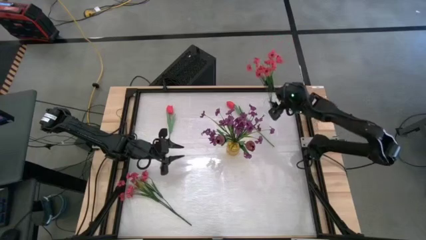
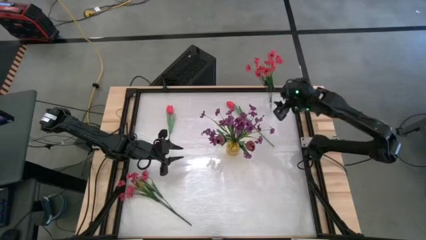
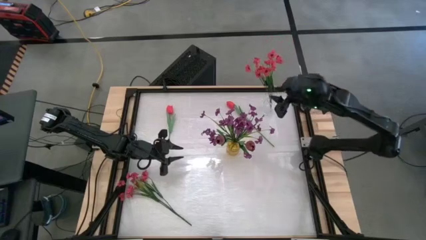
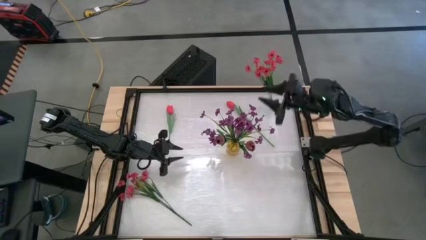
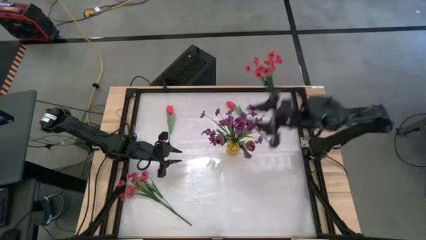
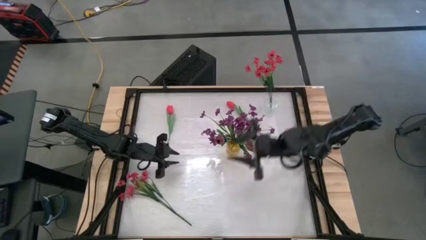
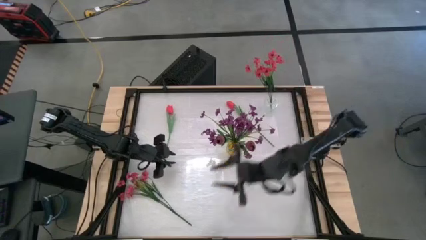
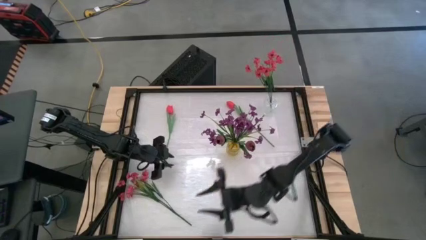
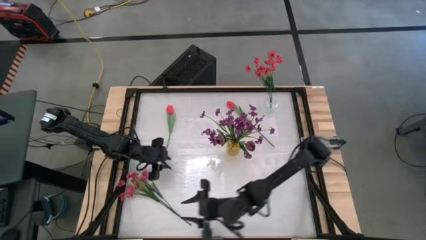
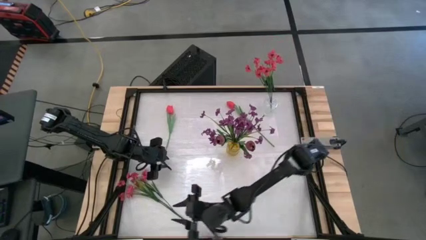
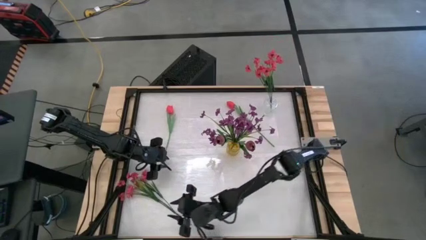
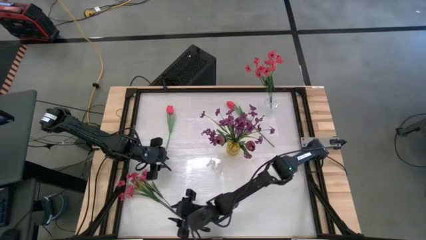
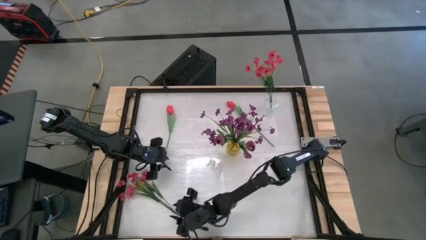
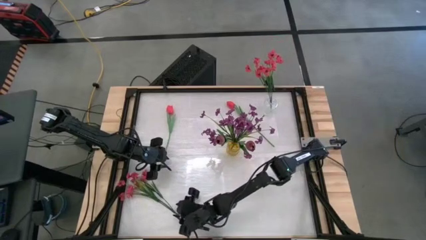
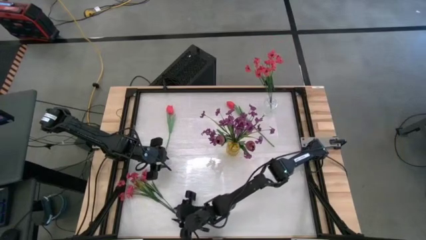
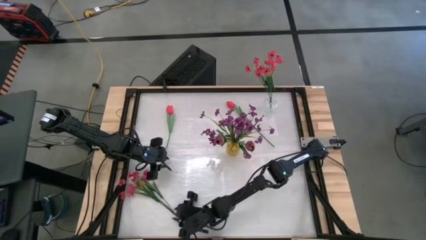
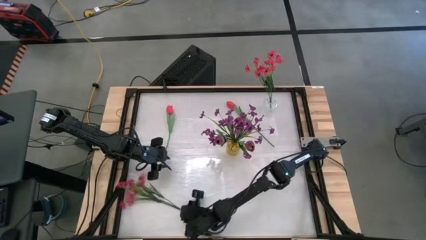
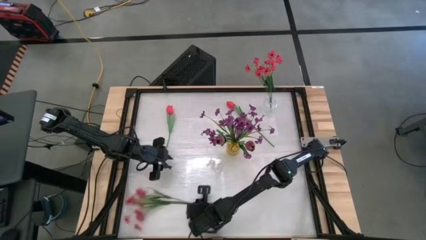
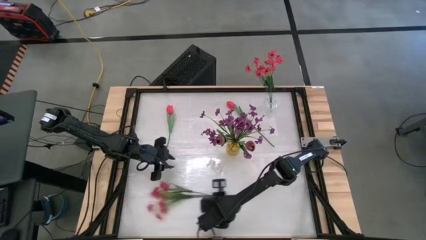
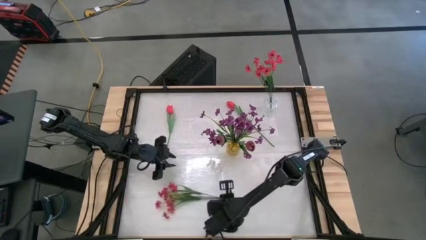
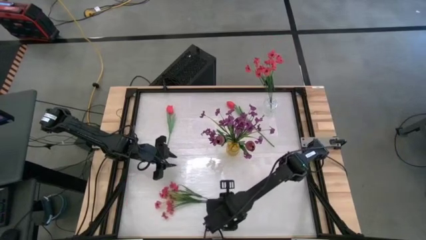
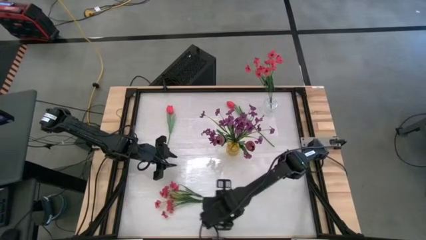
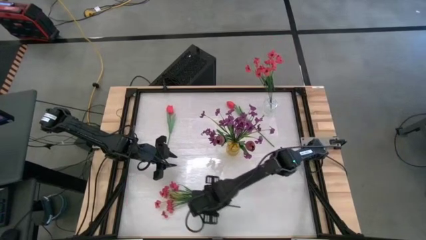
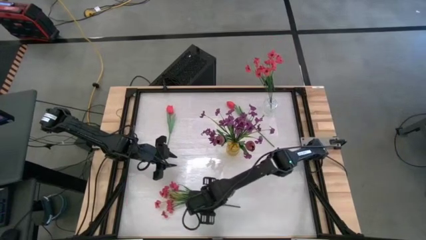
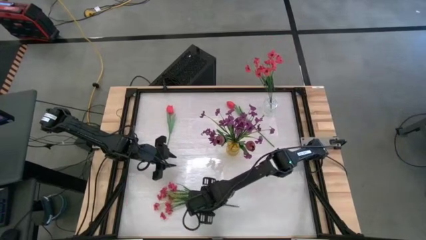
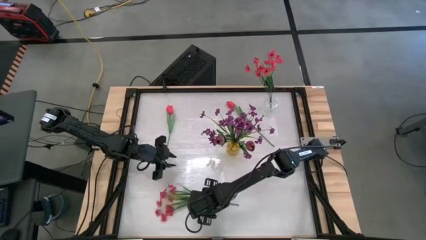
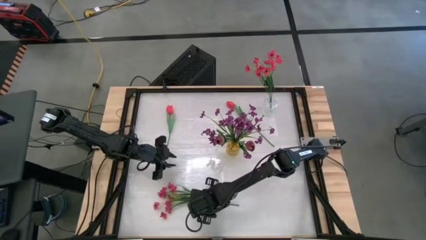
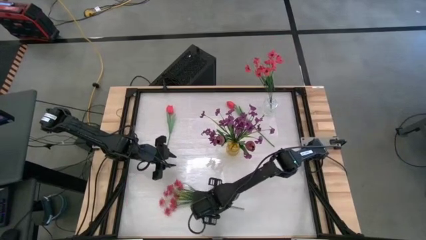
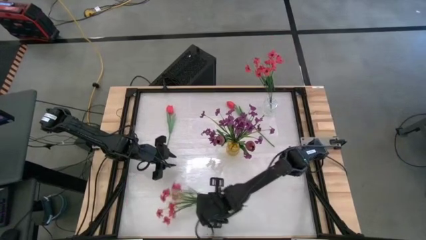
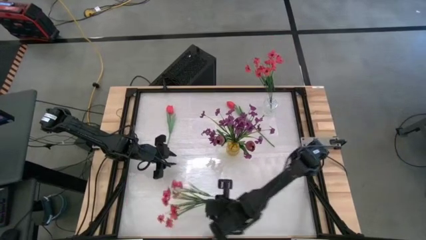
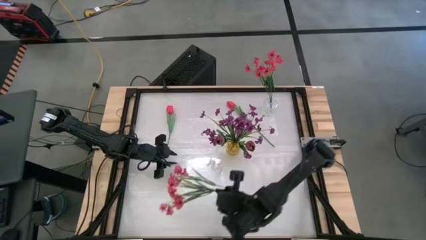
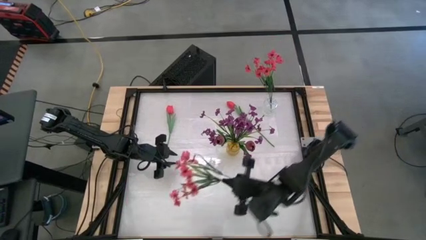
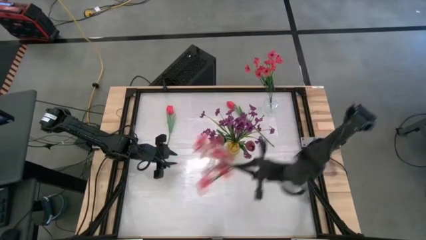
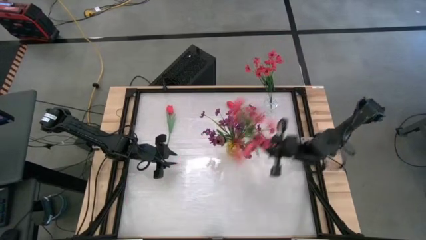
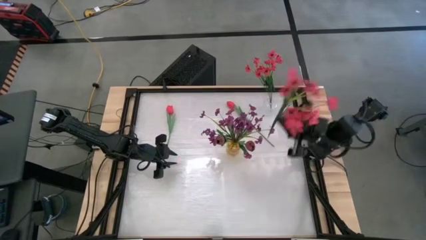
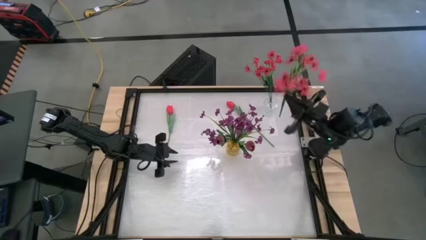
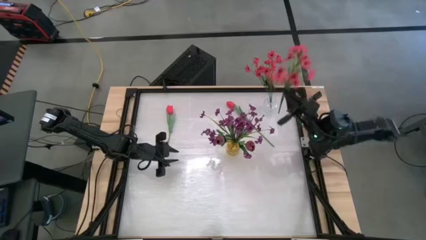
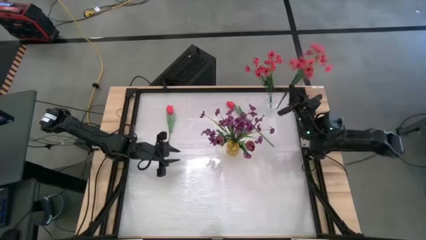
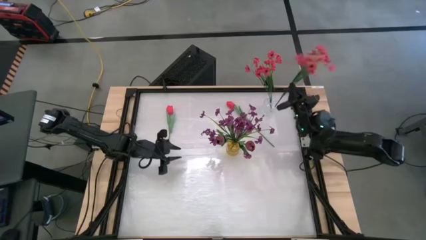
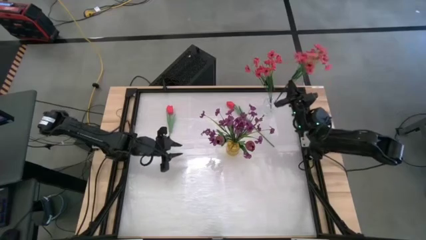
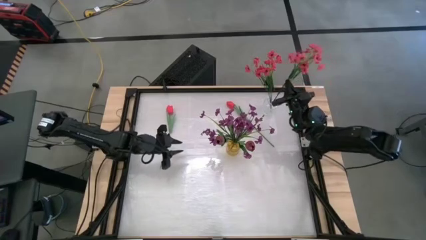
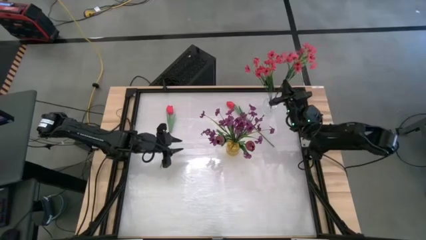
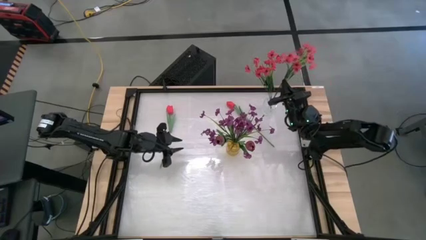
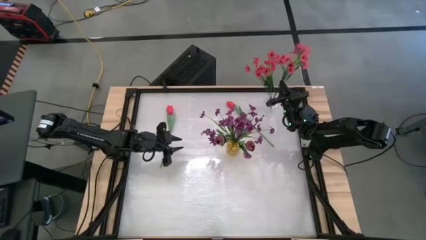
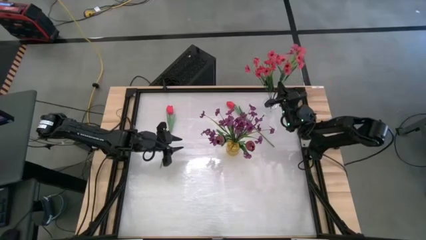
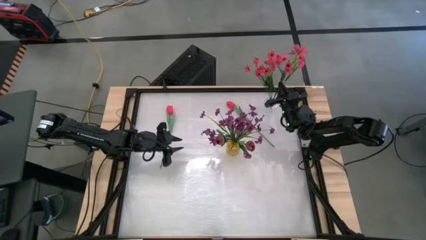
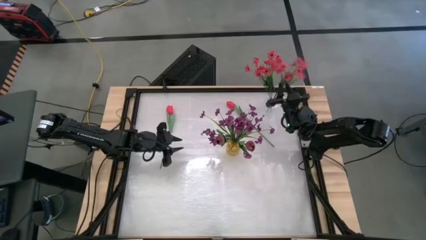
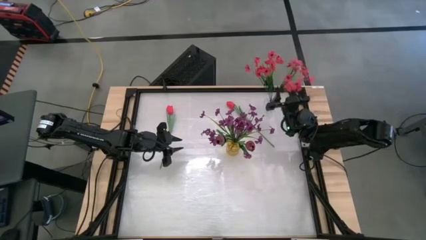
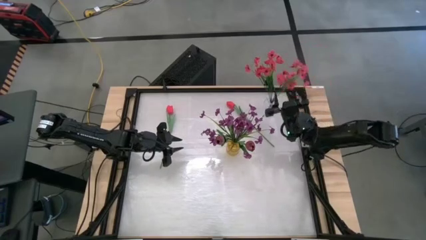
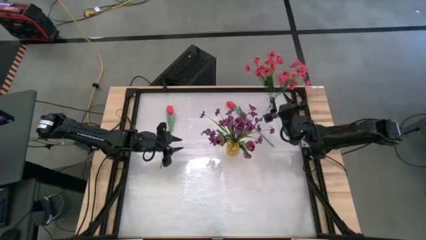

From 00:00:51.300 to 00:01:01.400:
Task: Sort flowers into vase by color
Put the pink flowers into the transparent vase

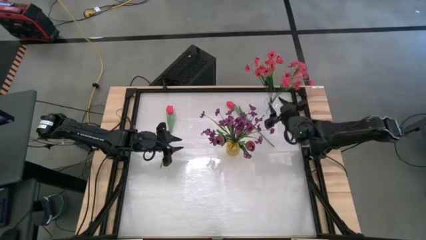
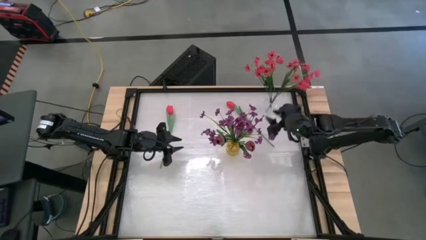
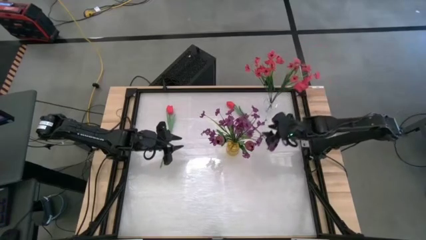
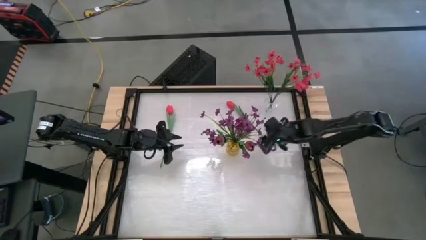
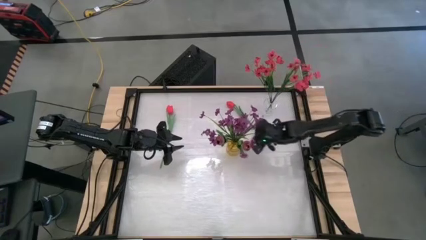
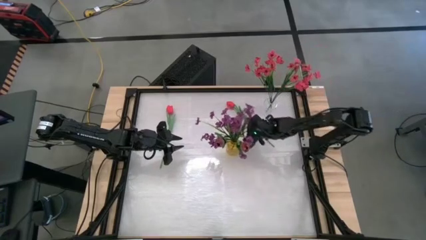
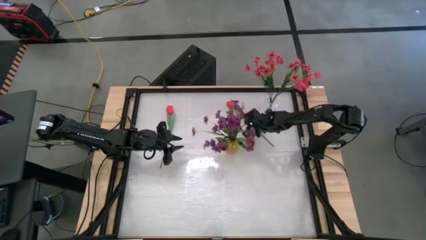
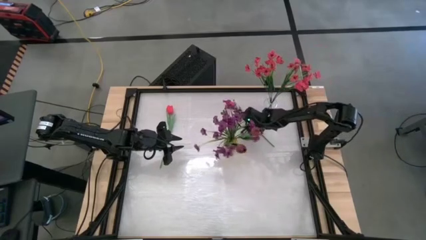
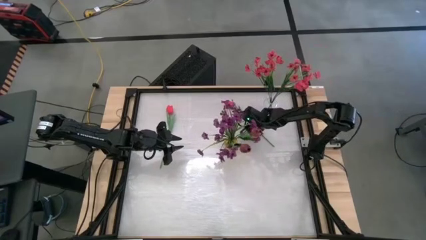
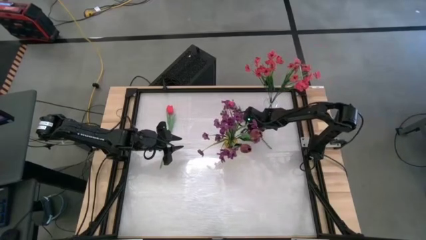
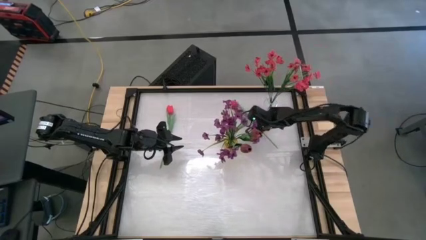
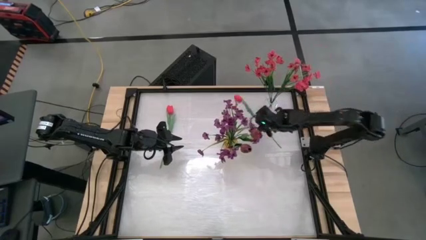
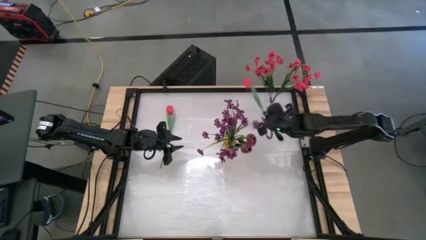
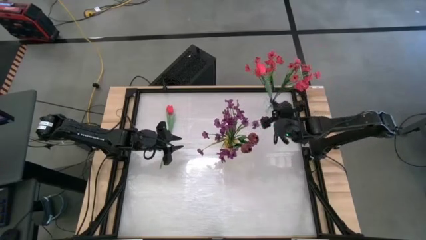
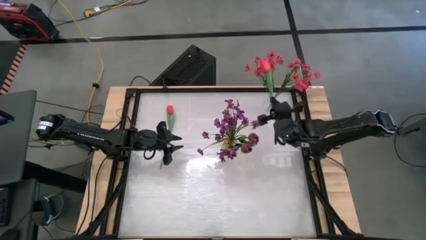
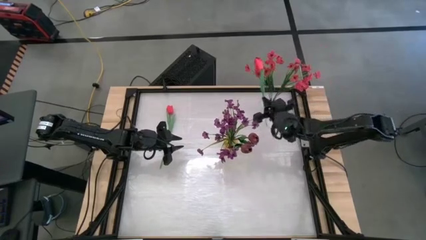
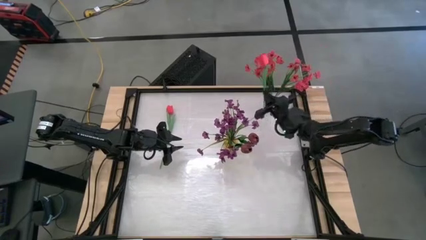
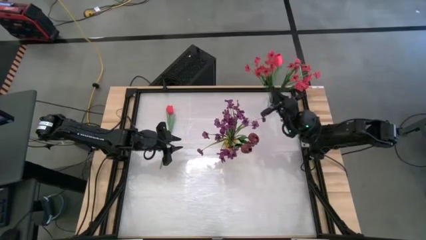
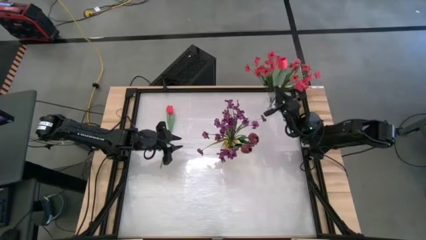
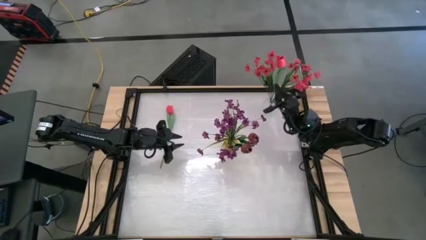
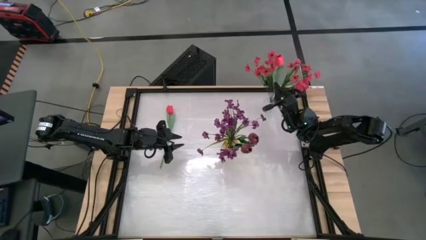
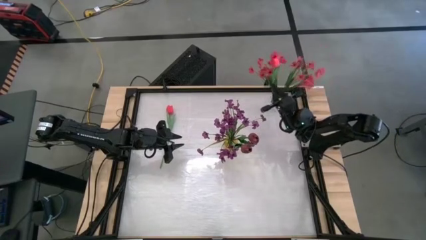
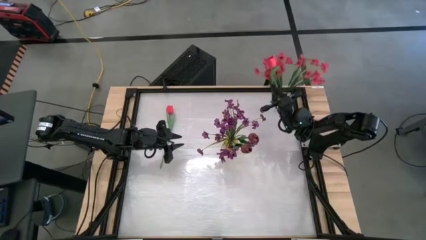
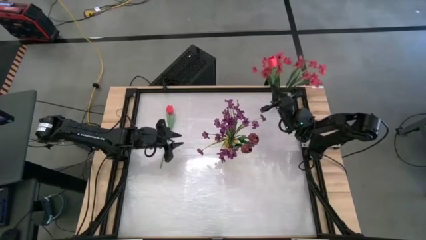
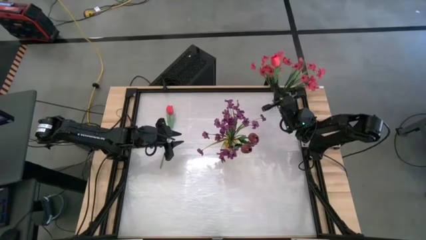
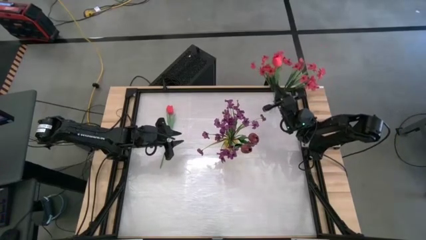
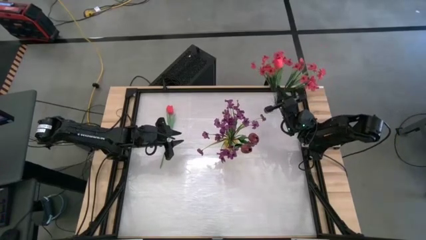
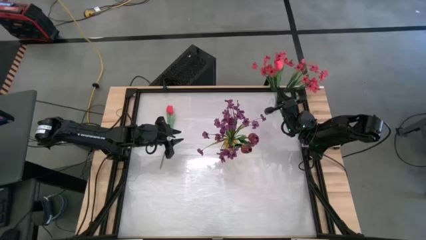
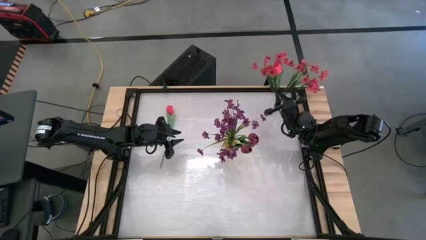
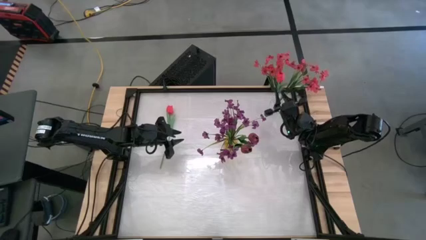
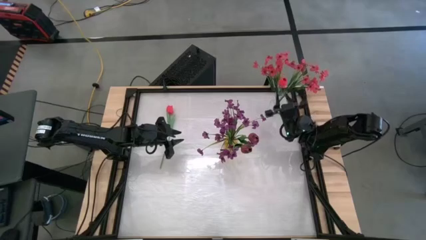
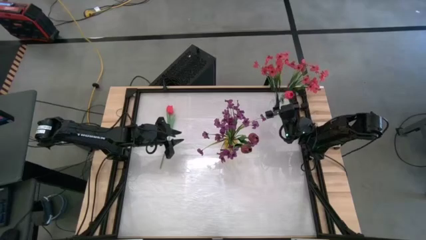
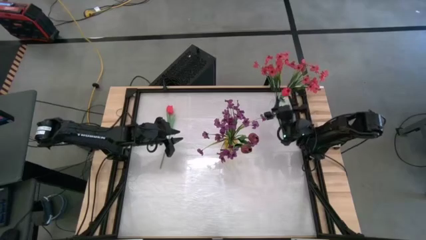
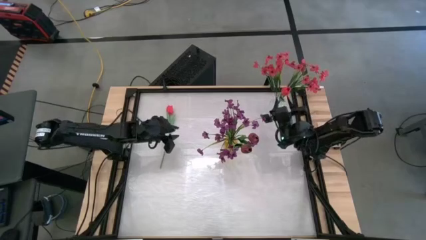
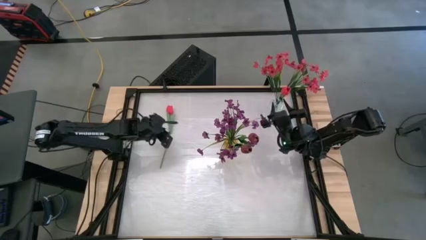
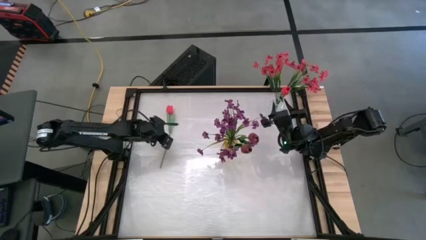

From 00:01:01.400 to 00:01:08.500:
Put the right pink tulip into the transparent vase
